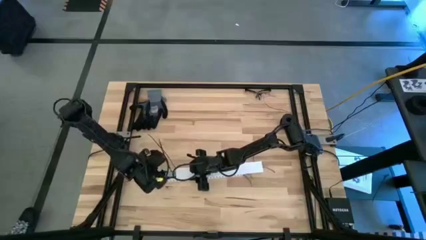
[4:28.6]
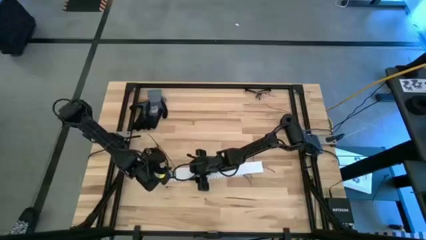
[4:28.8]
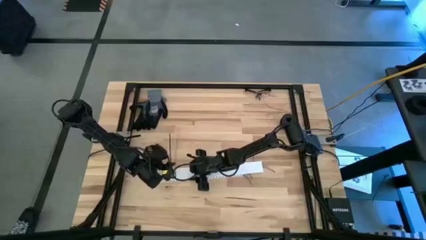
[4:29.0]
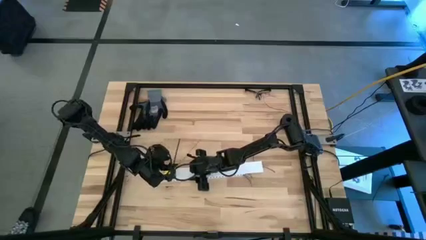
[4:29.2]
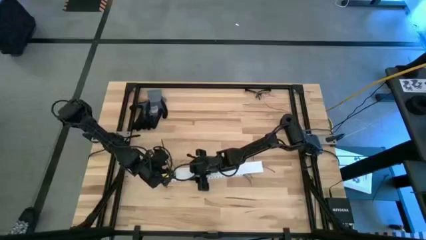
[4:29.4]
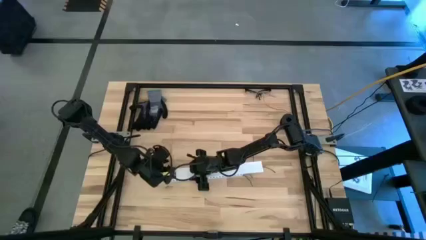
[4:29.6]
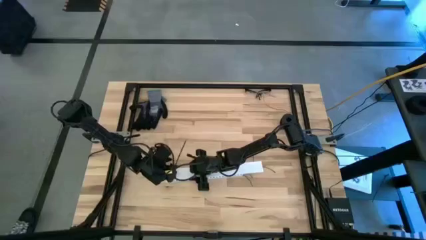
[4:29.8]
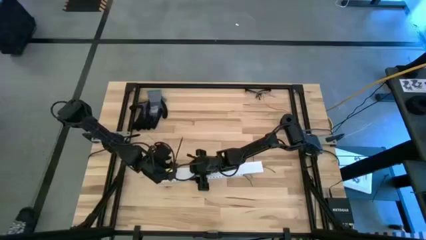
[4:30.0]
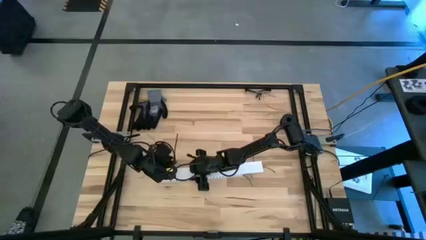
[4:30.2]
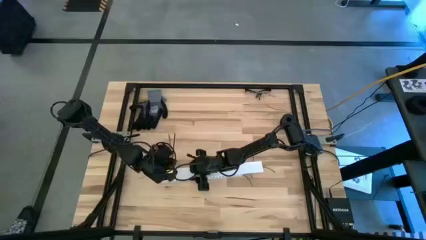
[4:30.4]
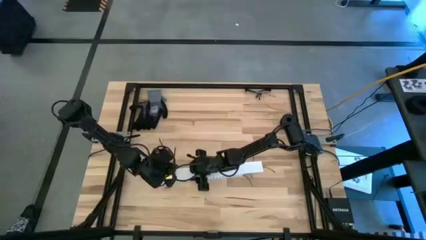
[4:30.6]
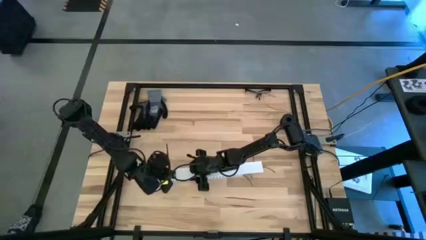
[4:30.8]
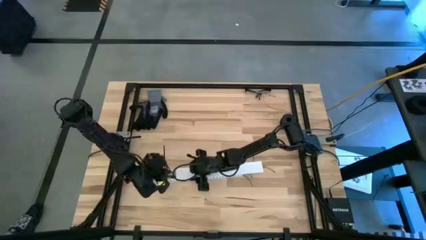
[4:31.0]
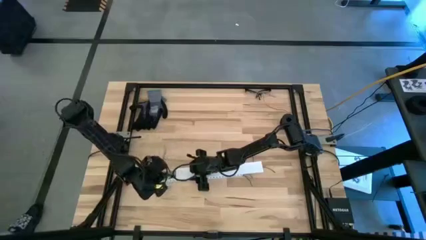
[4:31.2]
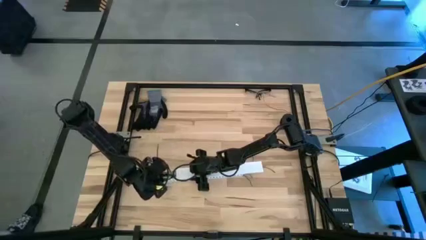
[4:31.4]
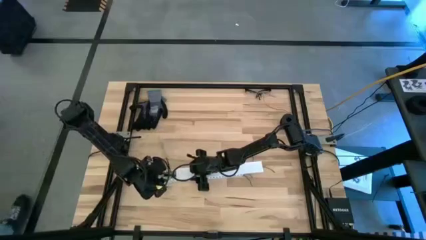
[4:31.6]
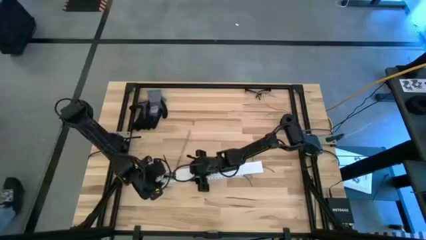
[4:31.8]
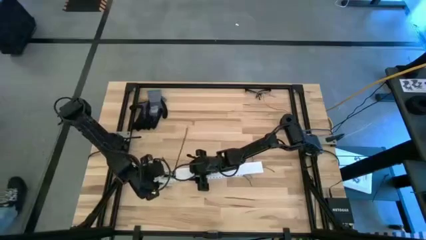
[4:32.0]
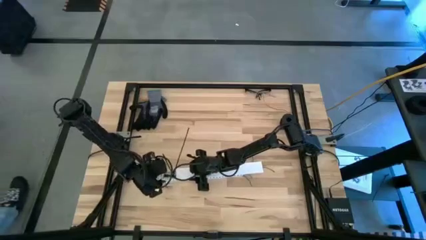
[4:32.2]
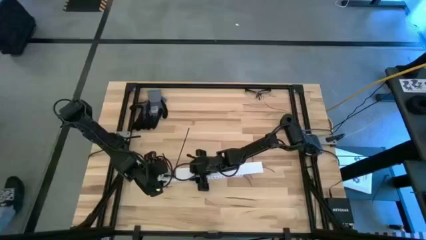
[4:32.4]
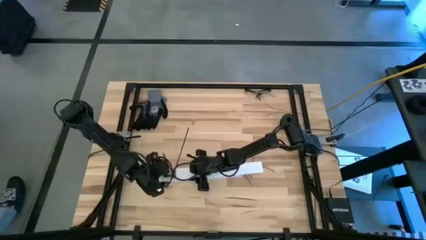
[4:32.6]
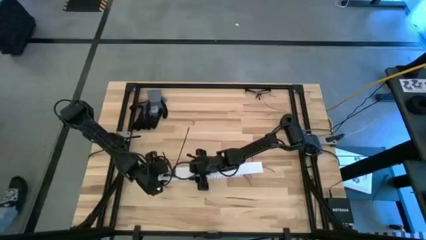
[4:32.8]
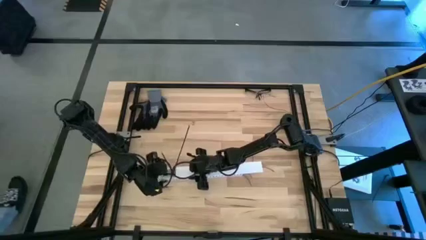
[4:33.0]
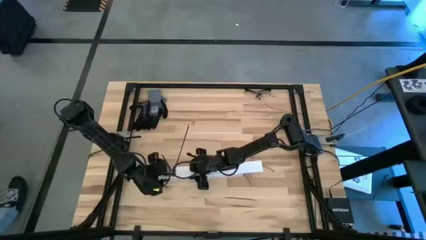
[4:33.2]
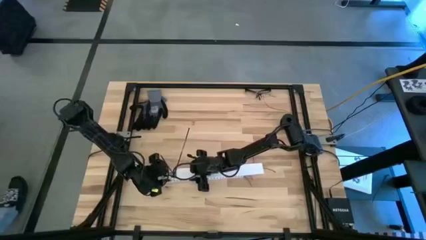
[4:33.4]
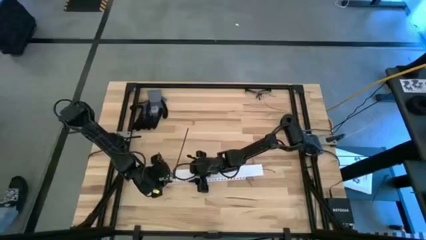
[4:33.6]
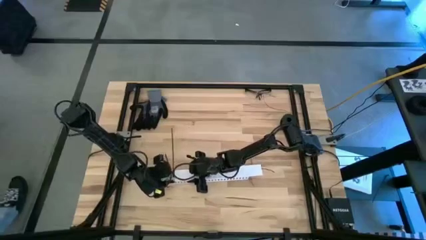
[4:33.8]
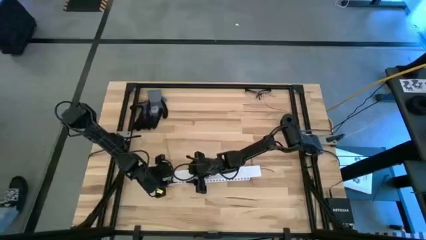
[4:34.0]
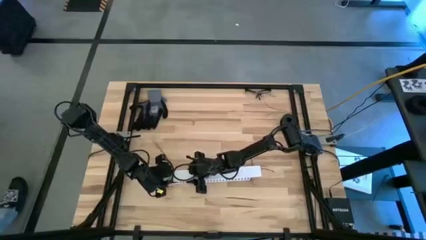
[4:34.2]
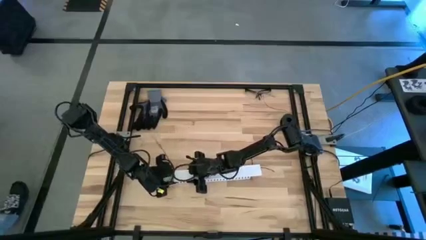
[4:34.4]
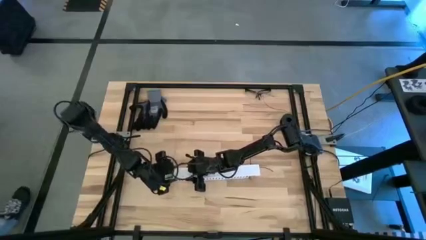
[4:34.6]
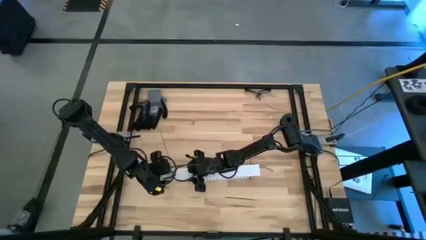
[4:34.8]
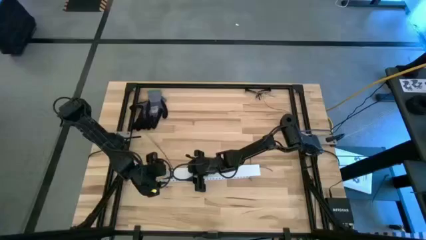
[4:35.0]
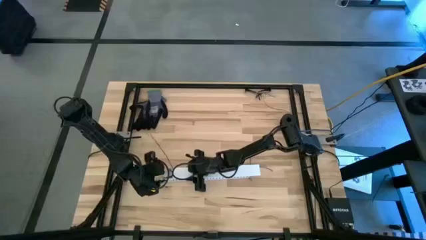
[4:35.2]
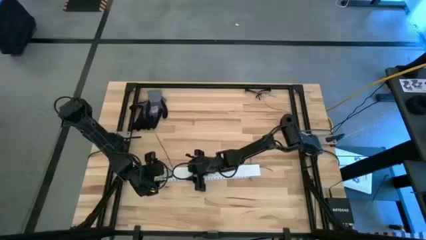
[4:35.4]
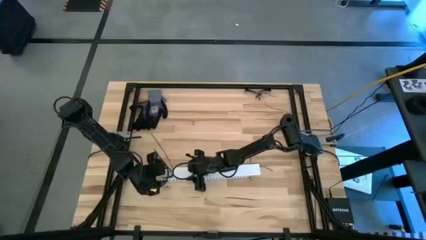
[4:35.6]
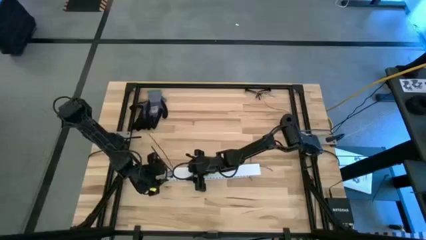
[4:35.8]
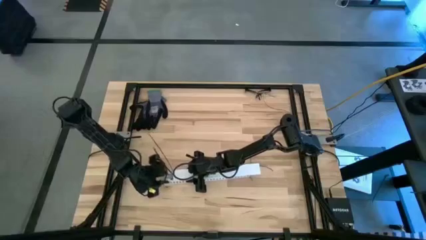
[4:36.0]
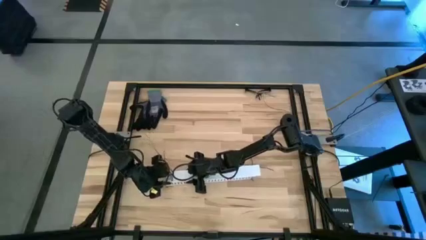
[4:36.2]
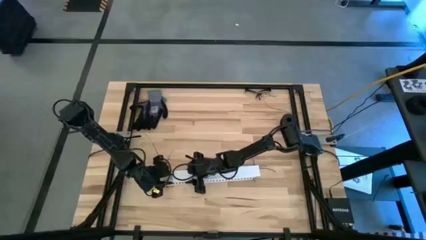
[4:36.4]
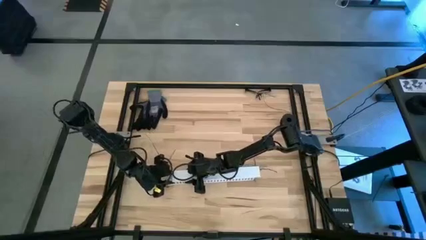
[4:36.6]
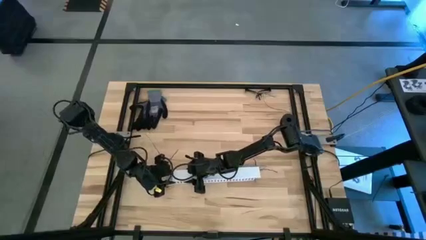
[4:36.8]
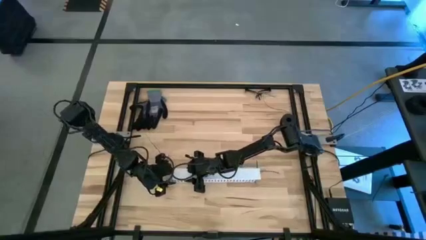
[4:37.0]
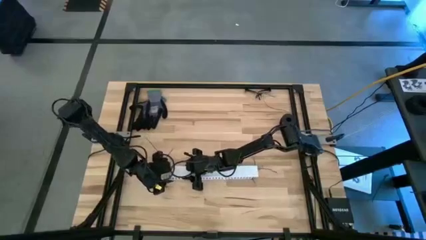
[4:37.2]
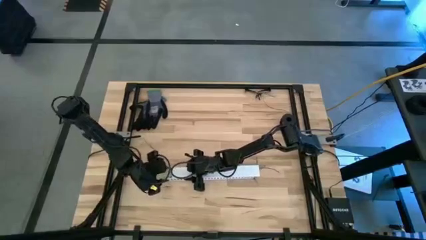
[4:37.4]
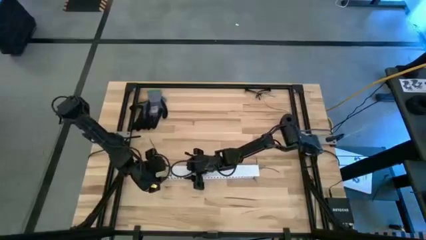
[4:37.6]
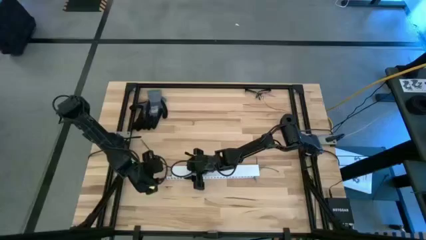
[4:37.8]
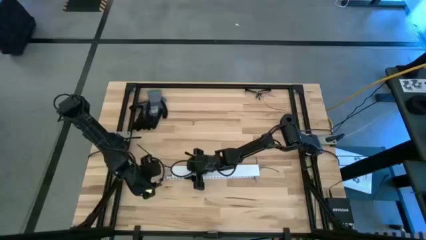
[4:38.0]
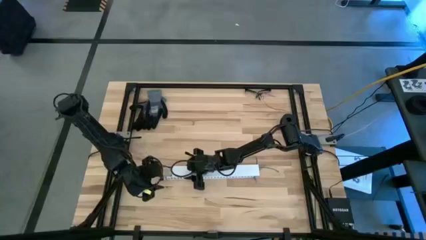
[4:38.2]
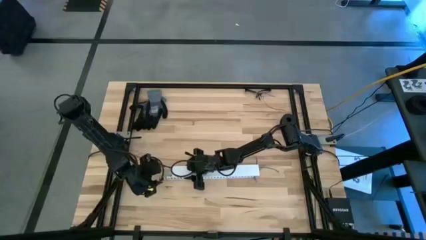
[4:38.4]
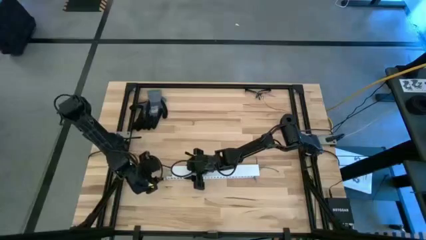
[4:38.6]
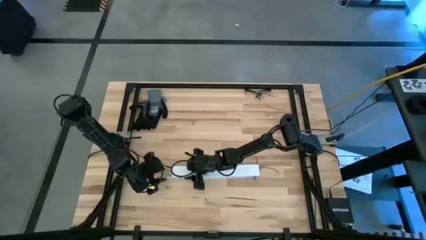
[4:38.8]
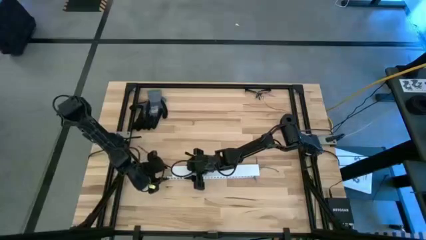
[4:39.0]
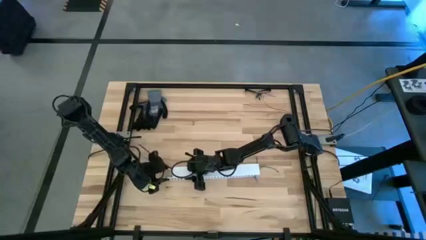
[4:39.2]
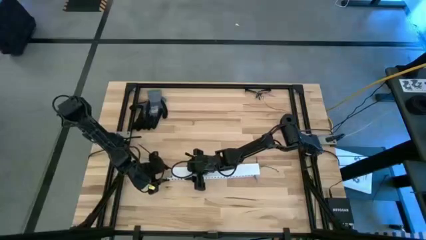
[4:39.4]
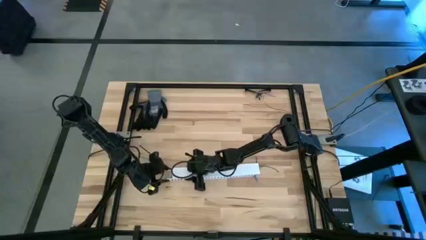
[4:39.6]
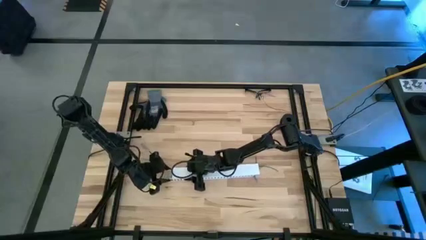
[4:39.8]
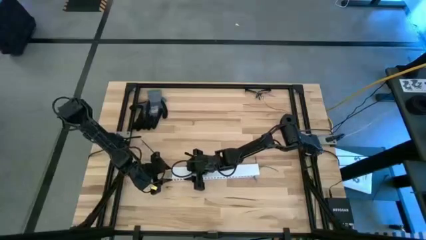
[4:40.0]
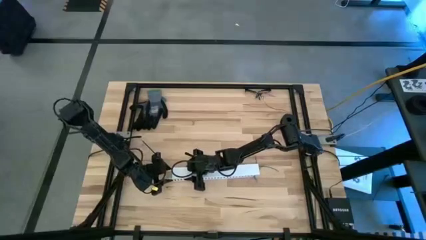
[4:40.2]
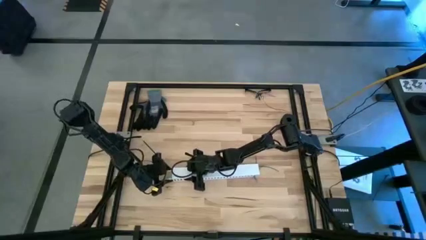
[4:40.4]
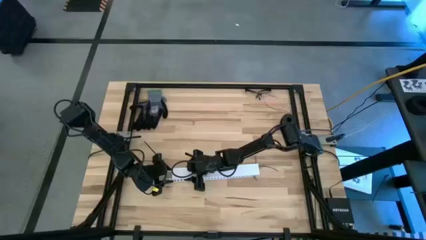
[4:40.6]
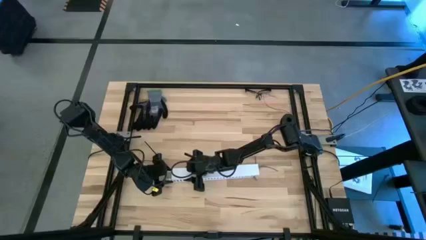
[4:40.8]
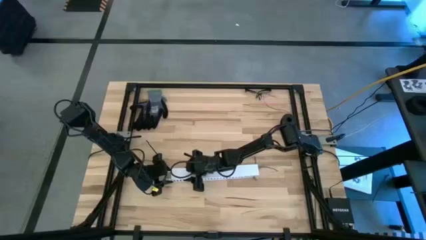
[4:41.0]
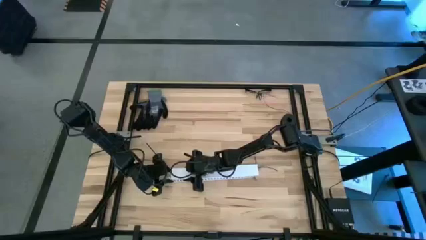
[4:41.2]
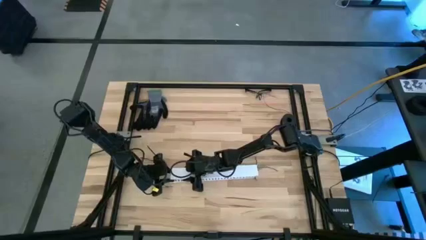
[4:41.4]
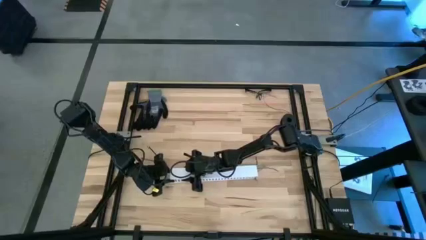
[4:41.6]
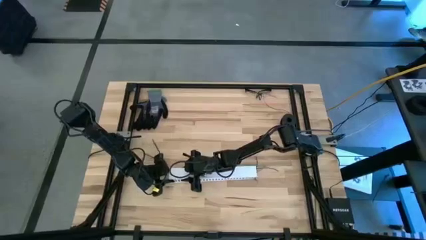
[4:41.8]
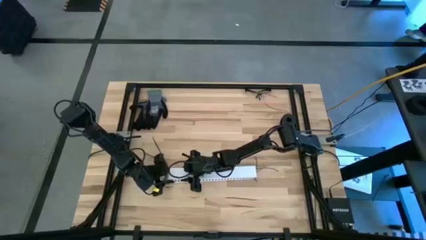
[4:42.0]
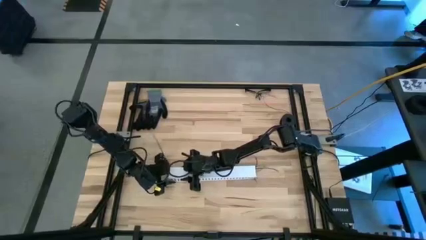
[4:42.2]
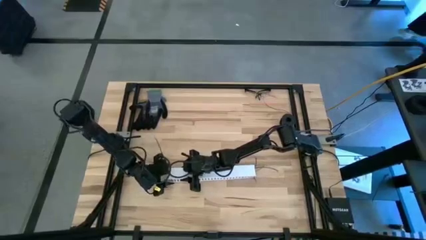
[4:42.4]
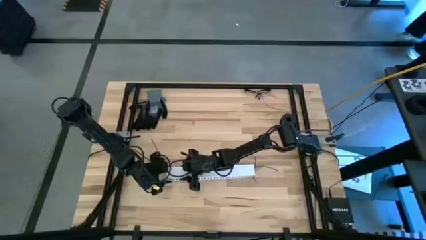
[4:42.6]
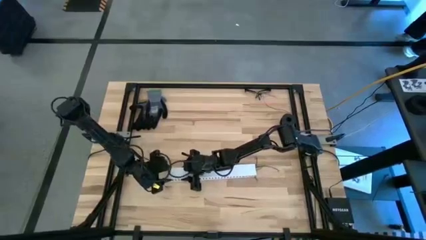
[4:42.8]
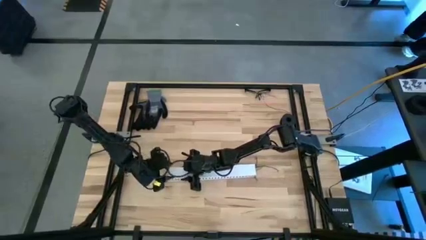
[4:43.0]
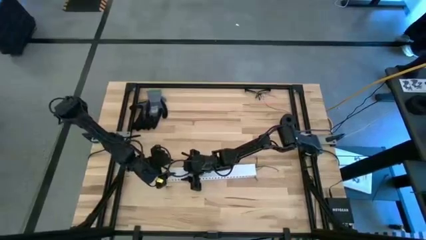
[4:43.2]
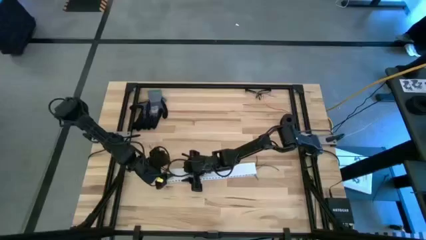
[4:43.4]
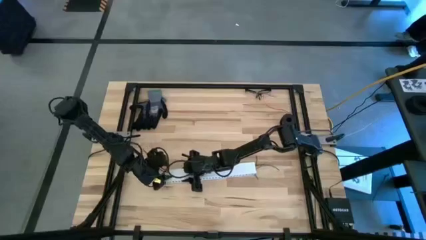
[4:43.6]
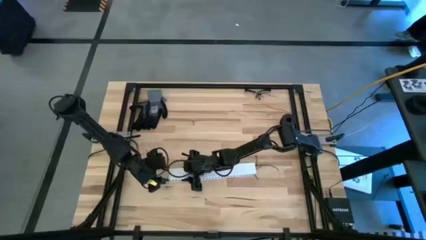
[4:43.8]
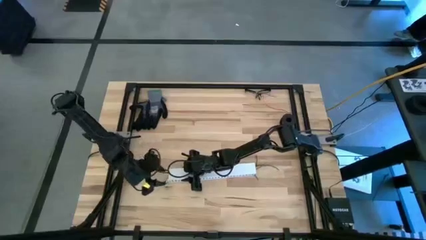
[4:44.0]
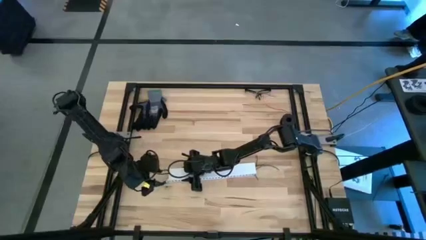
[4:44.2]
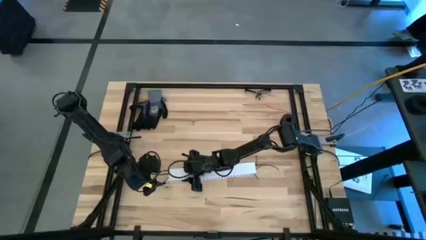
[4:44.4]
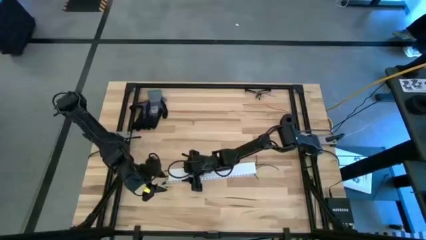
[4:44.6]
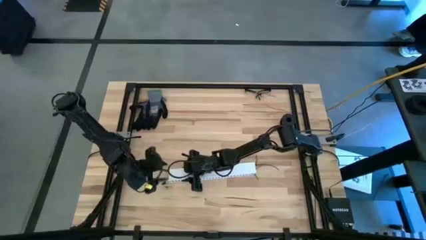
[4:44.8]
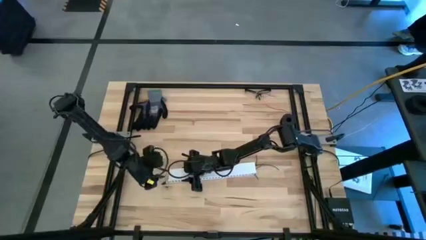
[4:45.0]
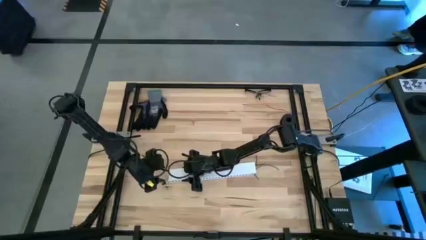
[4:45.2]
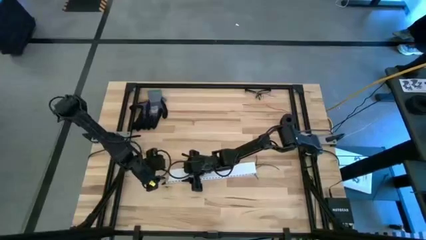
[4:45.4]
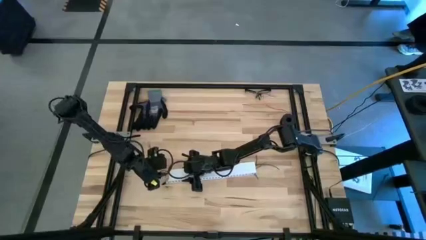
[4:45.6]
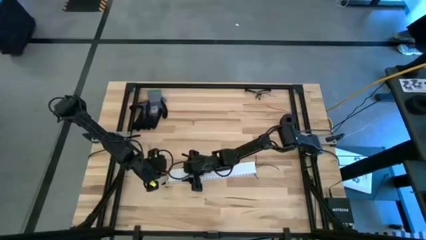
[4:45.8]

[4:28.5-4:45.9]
Task: Ziptie cables
Close the white cable duct
